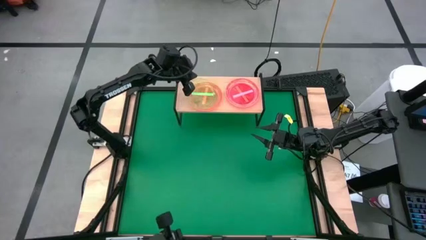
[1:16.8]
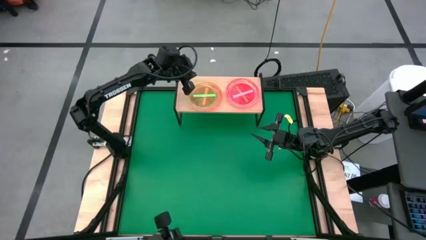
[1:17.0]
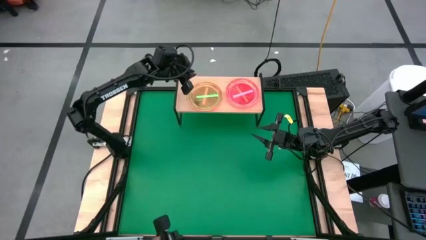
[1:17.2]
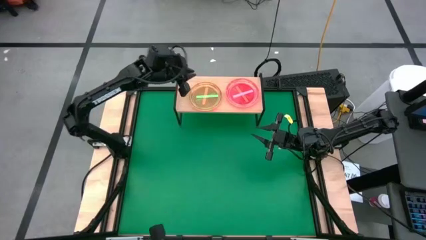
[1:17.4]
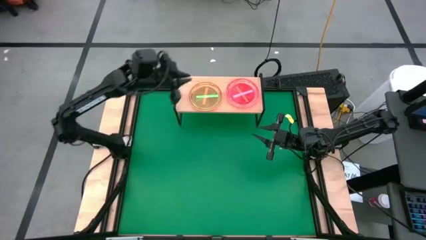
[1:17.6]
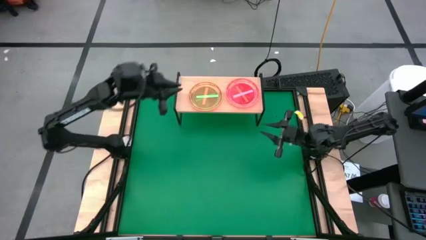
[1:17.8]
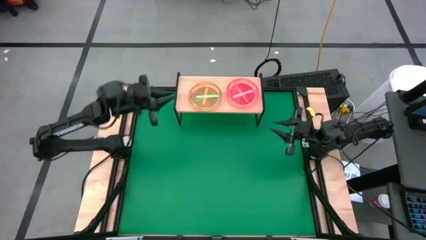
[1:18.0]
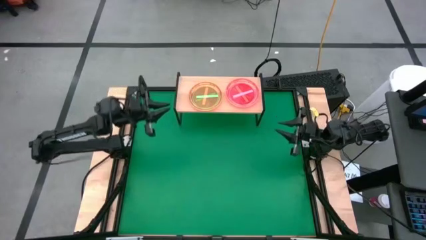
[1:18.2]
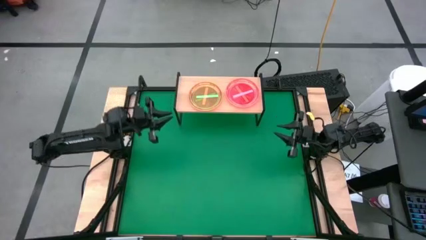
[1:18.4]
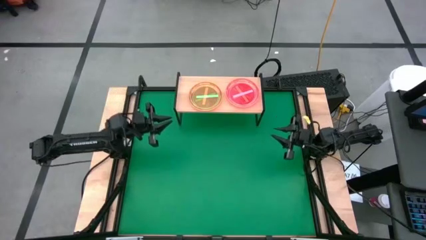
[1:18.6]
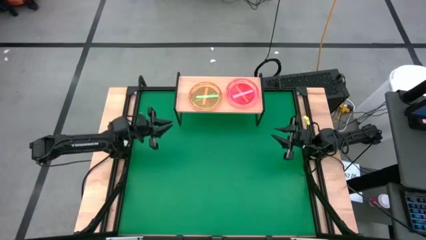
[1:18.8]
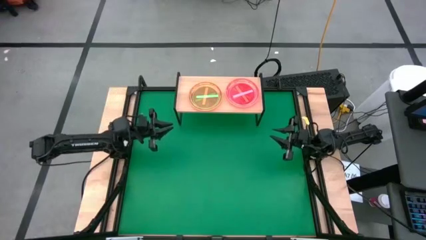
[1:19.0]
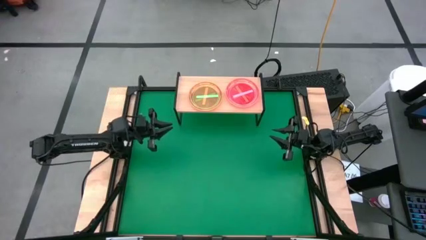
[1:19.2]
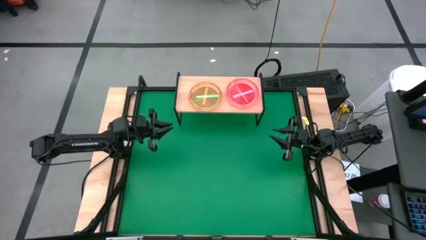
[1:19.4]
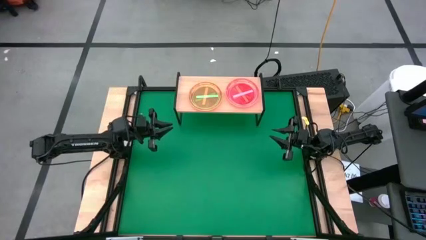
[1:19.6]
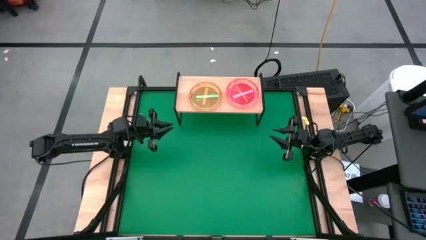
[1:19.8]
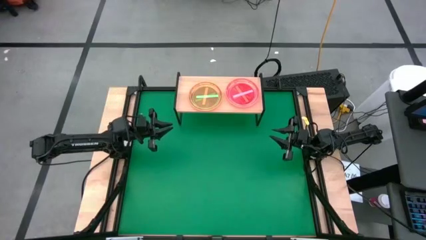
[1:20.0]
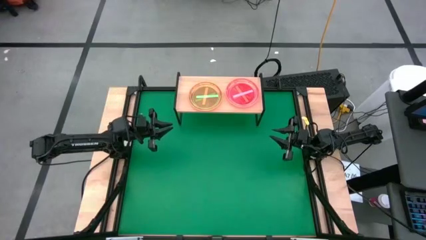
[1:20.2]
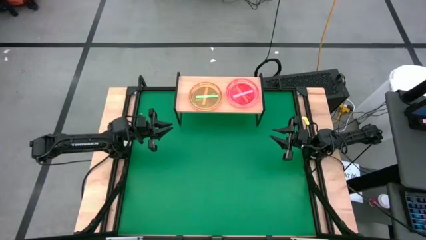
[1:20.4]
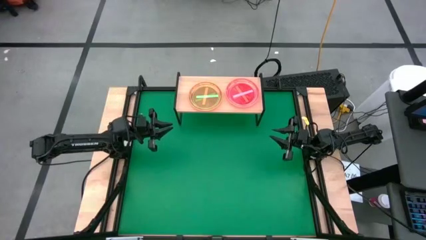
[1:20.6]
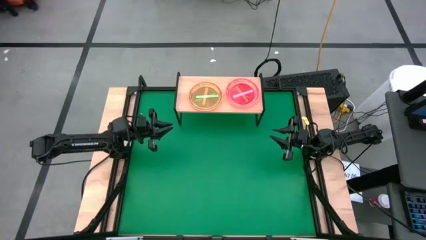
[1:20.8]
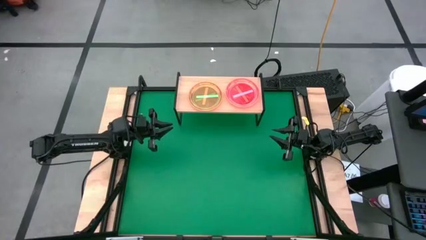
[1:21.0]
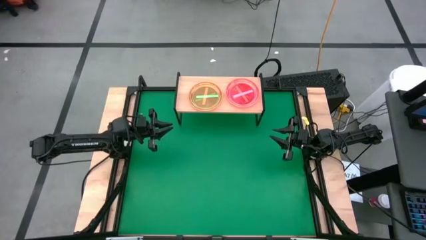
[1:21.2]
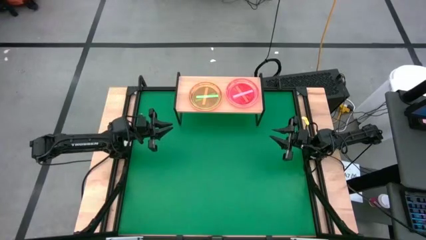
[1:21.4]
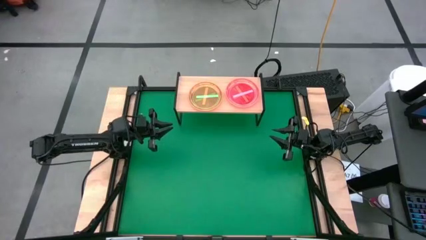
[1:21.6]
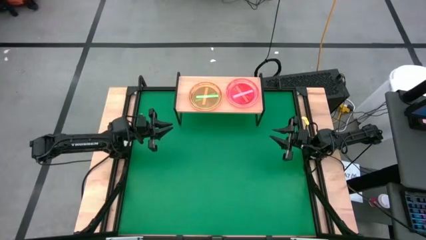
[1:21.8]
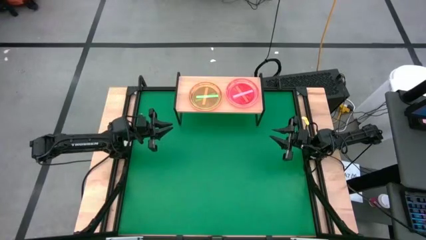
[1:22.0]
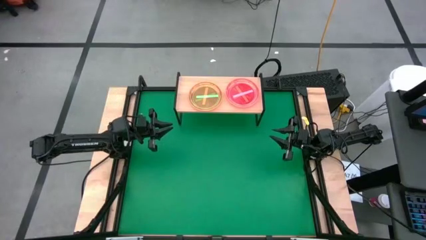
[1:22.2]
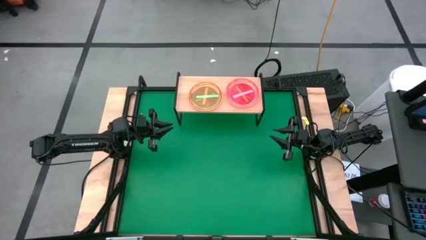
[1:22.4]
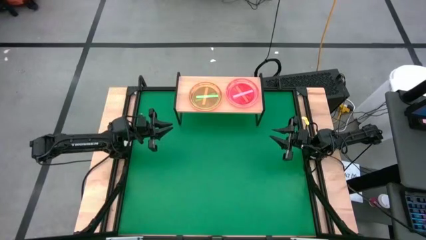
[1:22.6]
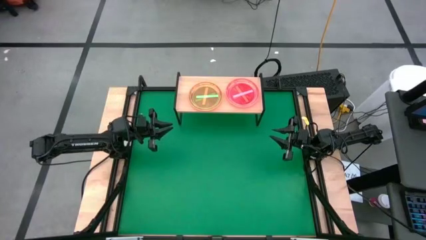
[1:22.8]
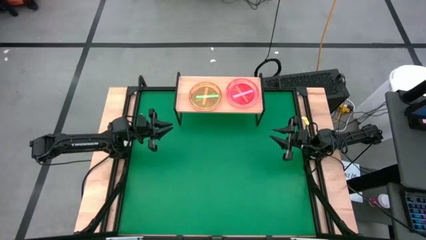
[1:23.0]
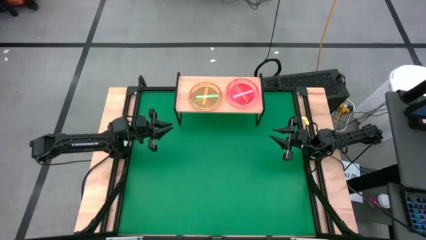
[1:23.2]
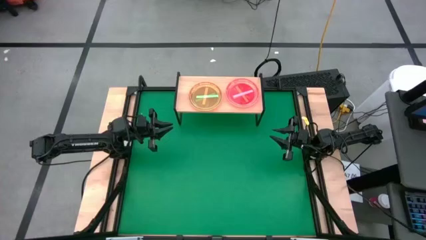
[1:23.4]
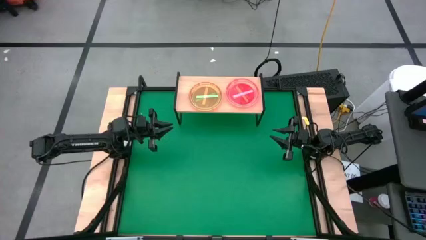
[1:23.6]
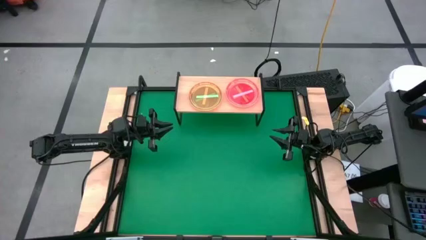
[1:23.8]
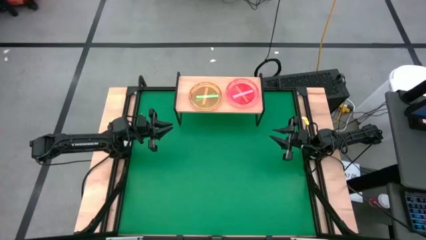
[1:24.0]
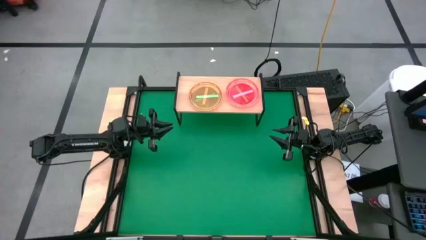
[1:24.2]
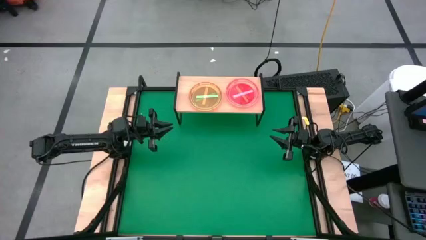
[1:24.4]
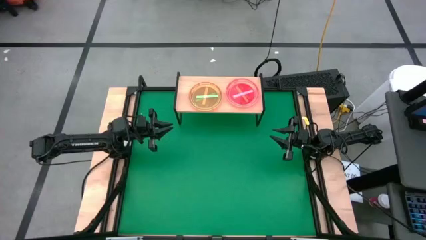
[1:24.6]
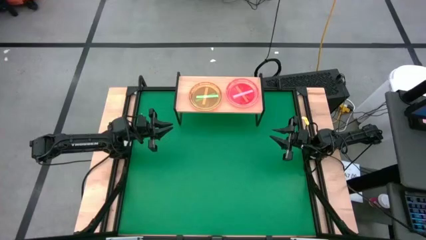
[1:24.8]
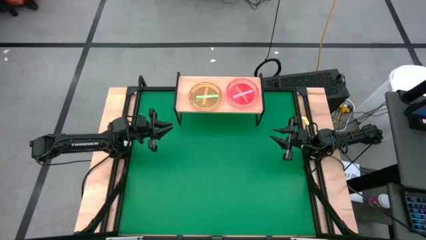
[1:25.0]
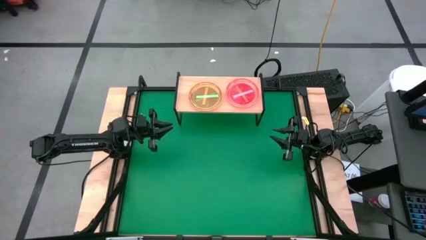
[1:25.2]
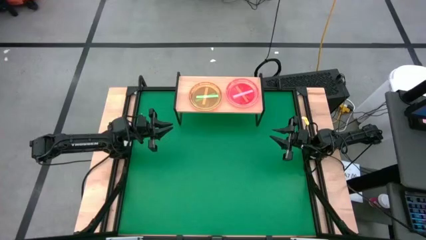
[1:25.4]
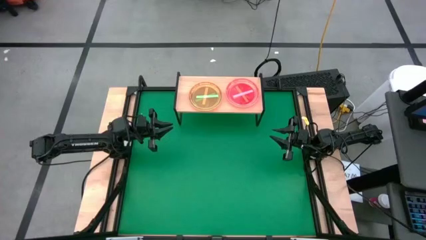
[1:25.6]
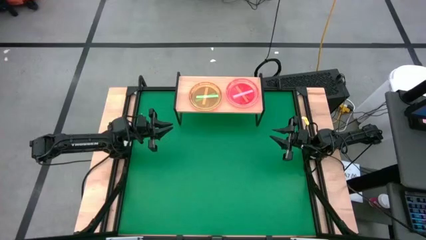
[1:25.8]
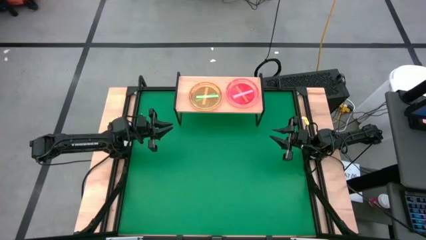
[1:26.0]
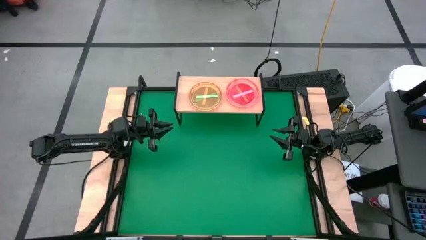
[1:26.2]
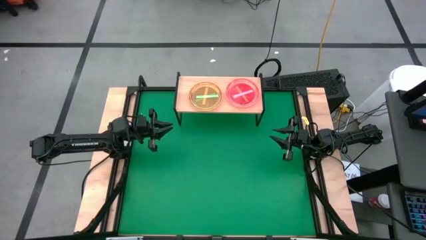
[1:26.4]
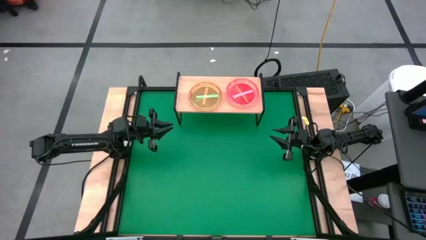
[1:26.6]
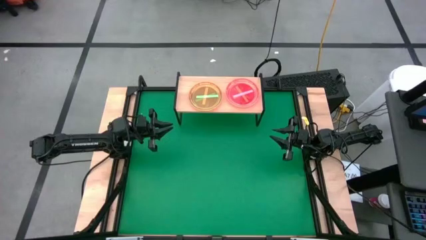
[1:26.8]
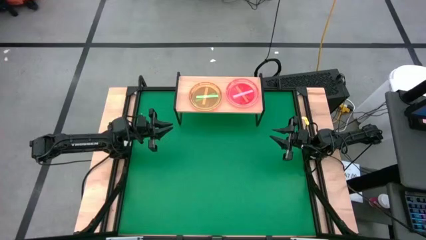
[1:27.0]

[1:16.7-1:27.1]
Task: Place and stack plates onto a shelf
Return to Home Position
